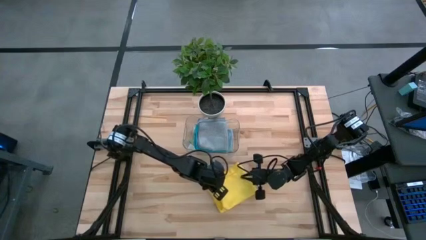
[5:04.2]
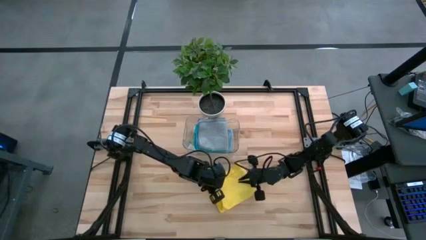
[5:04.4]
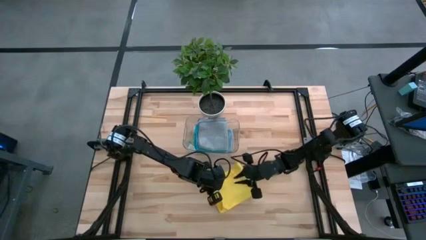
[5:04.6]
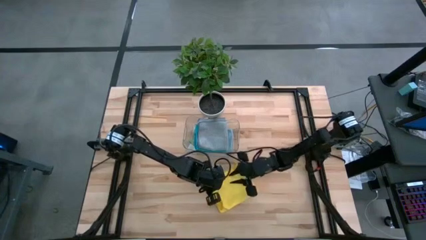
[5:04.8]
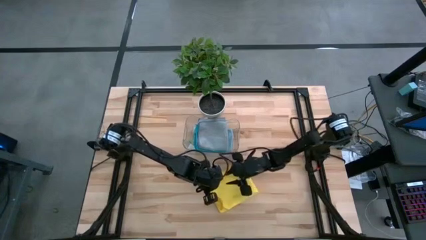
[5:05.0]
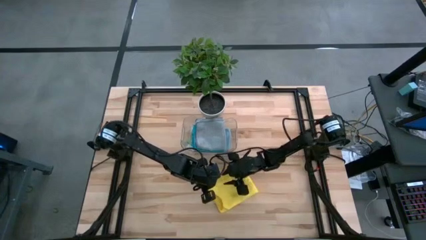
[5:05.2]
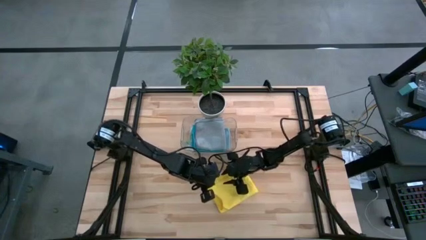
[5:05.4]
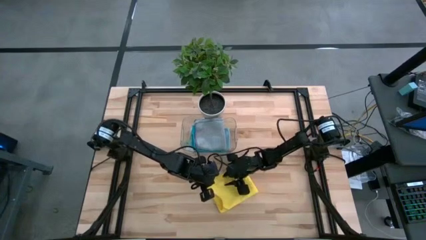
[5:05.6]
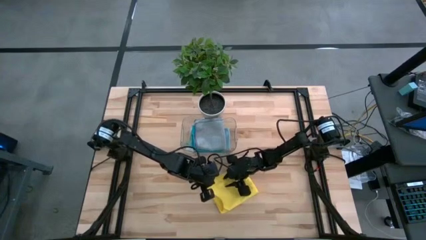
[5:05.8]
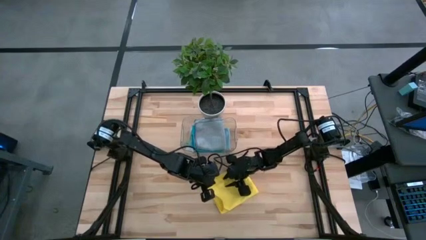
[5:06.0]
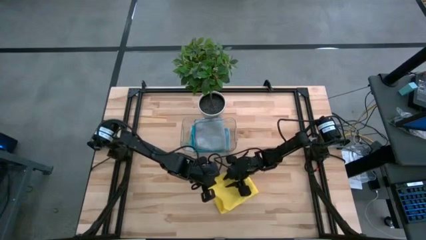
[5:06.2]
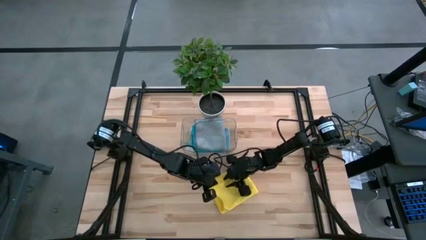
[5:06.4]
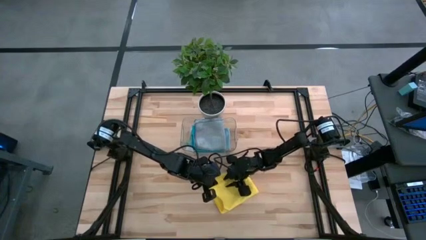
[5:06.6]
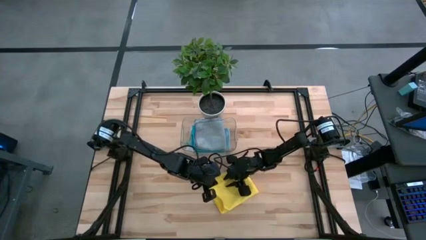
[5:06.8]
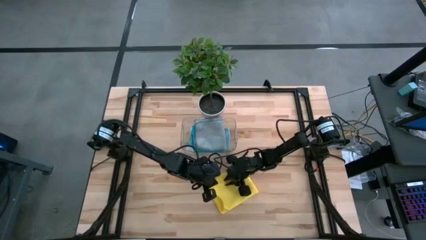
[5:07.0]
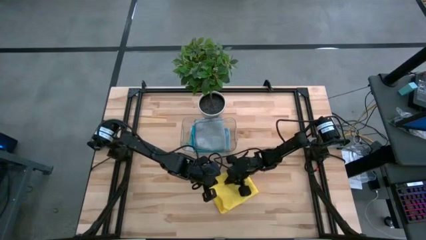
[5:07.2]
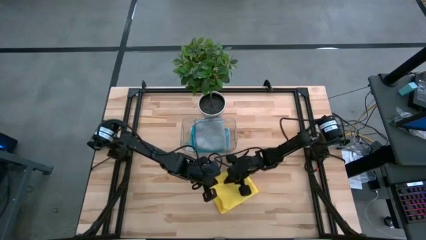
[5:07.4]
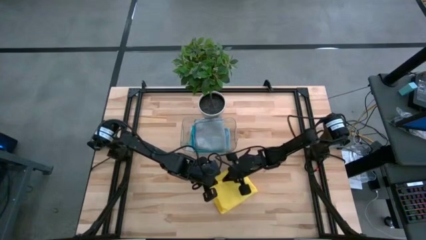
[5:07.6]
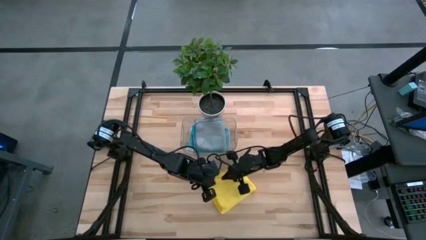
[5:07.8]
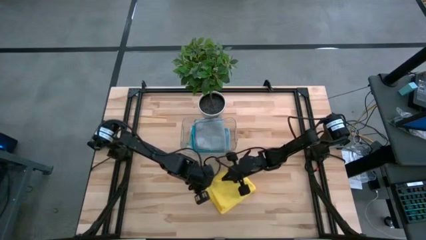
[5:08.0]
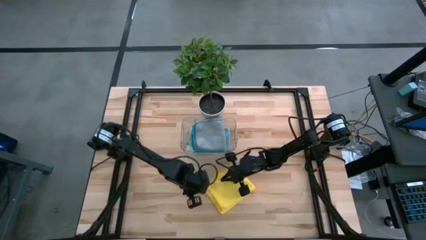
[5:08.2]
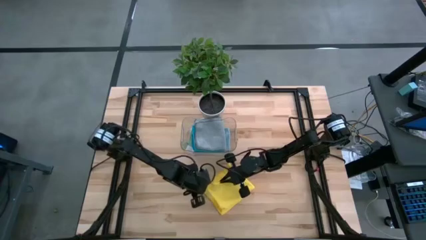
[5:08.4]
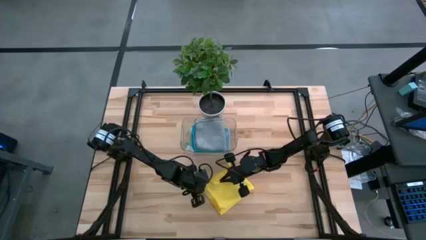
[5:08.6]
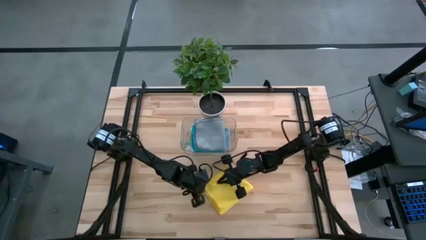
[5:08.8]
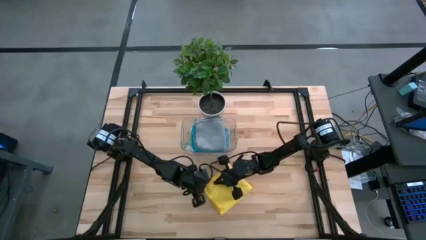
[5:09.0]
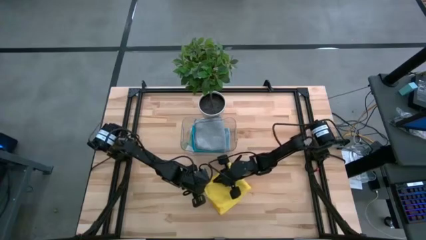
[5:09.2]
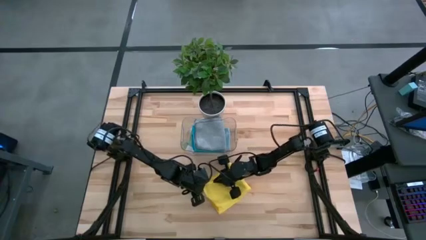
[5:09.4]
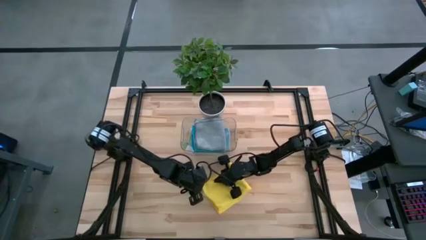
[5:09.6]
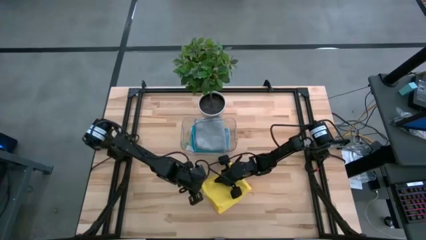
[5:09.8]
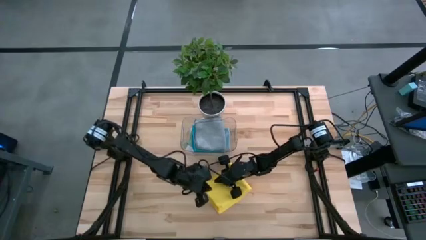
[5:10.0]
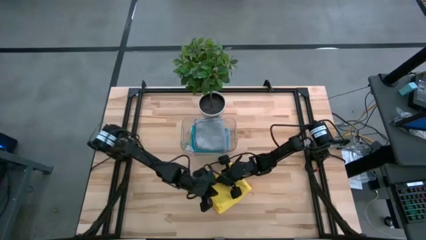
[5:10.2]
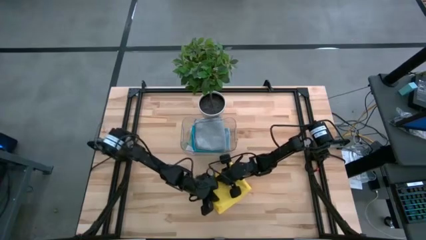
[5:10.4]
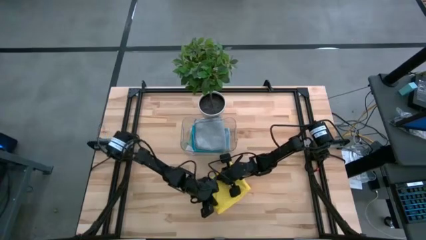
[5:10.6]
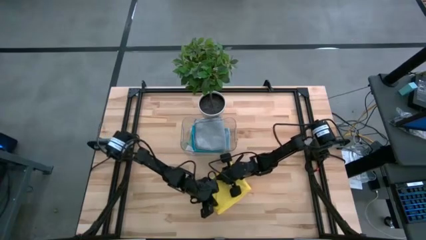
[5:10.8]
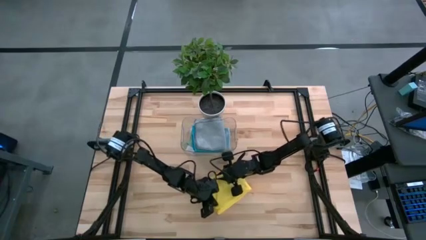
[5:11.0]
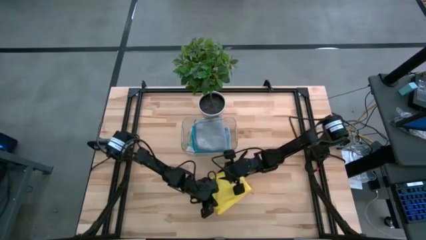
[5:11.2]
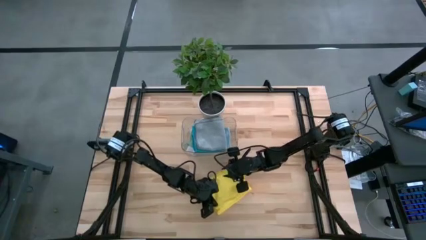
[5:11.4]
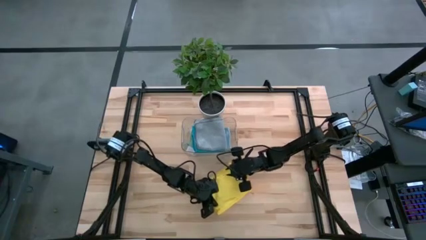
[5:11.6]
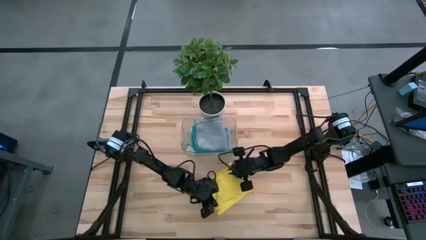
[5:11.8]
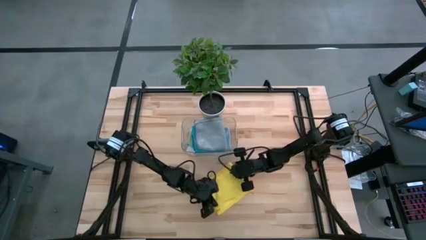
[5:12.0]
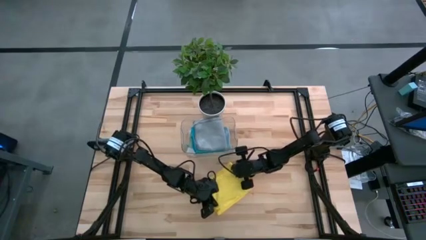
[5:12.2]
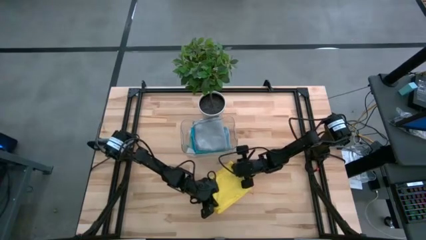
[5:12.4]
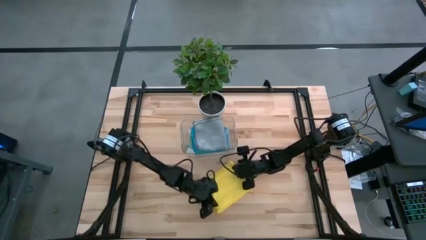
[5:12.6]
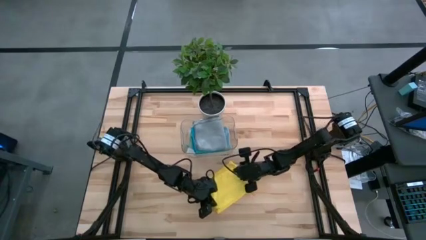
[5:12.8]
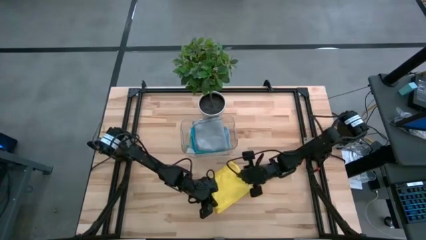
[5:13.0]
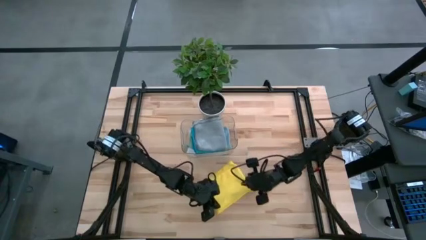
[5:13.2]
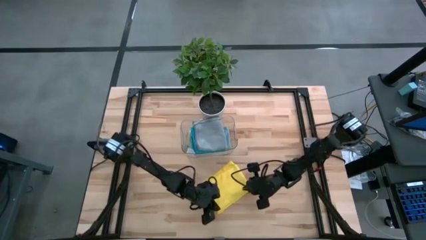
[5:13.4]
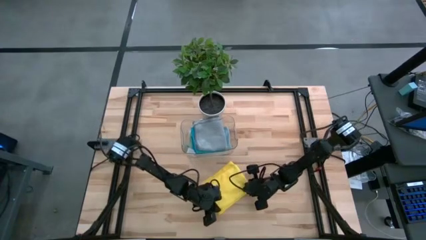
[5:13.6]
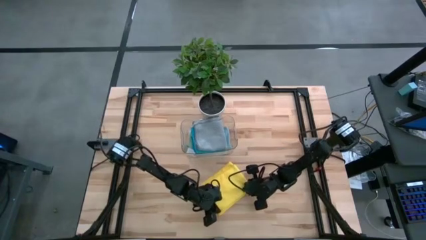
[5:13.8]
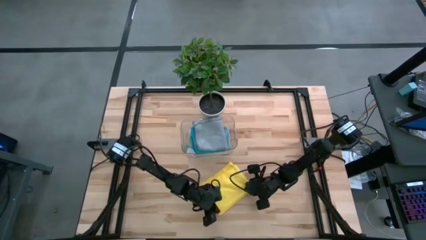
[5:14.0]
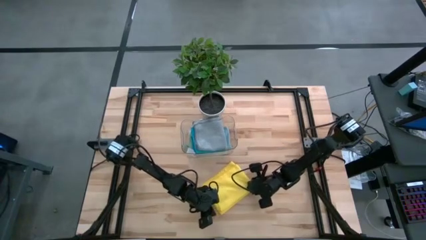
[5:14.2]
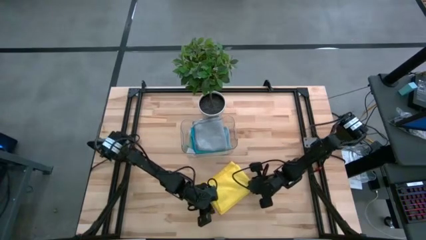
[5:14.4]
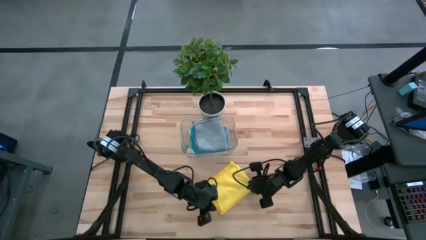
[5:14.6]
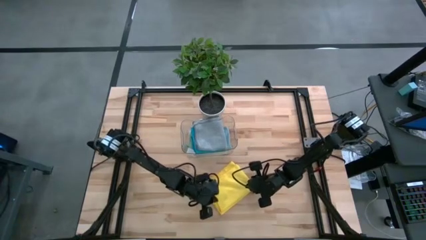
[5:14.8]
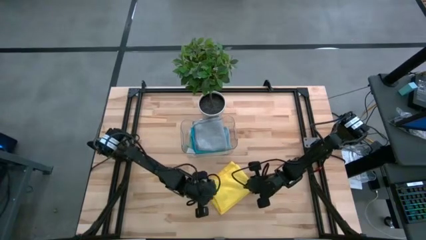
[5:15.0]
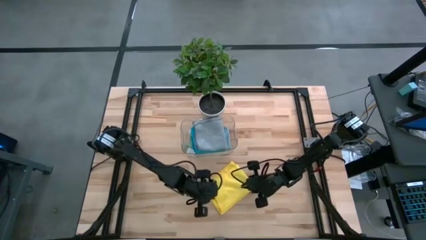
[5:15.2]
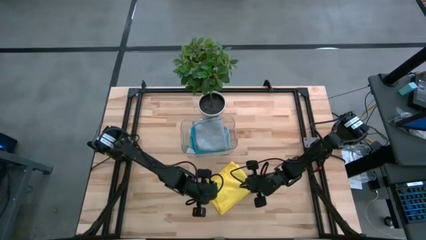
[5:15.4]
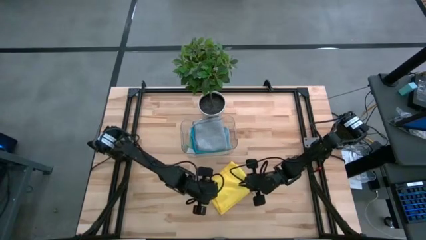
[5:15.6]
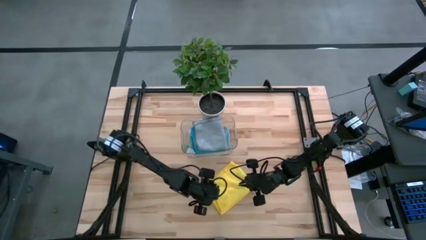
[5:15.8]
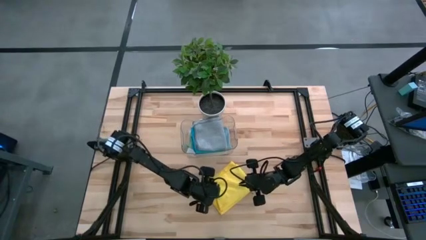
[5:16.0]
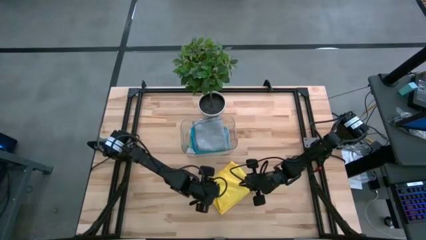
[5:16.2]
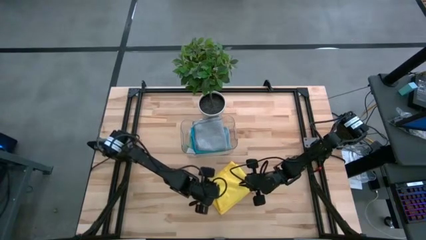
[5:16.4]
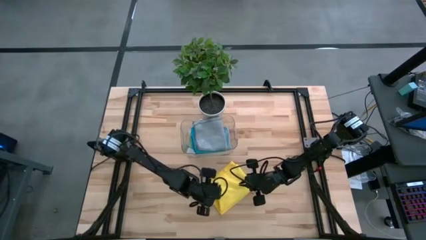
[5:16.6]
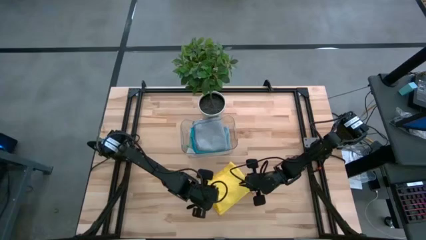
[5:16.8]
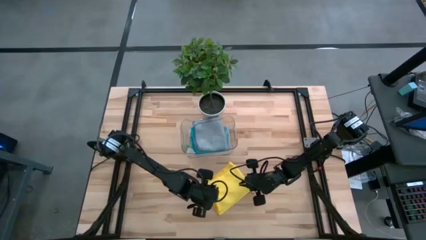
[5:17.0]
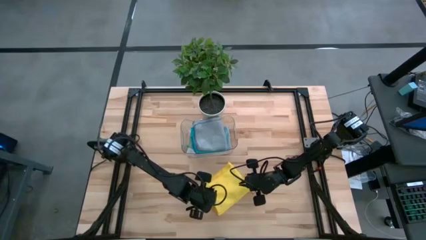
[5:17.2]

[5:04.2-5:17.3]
Task: Fold microfiber towels
Fold the yellow microfiber cloth
